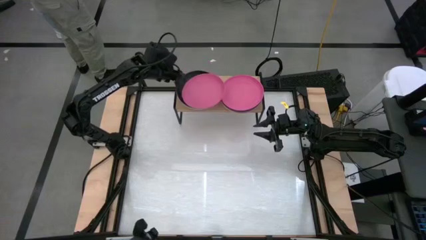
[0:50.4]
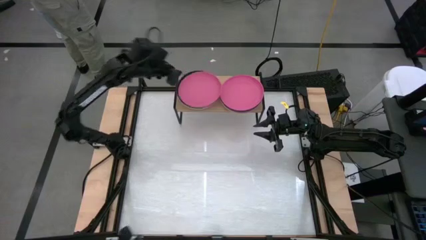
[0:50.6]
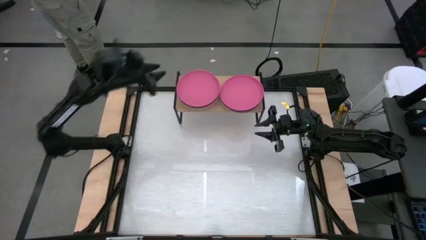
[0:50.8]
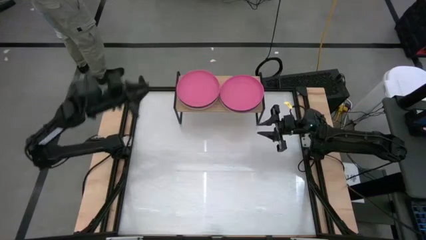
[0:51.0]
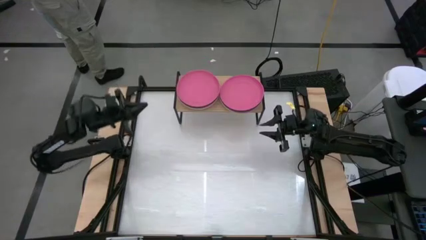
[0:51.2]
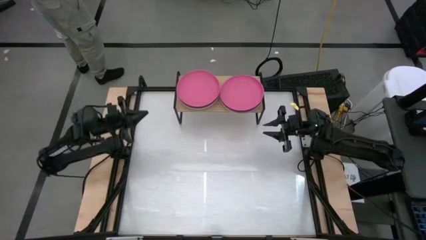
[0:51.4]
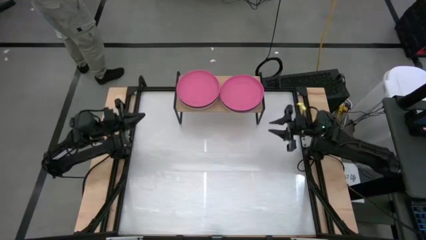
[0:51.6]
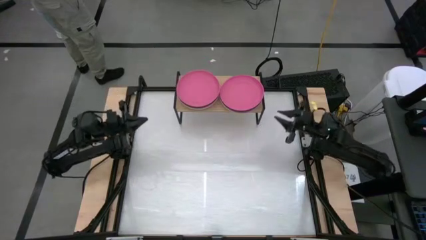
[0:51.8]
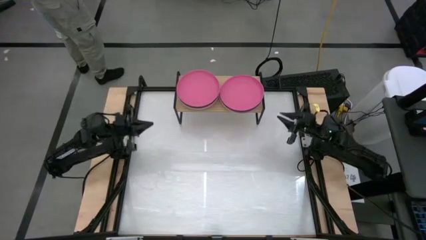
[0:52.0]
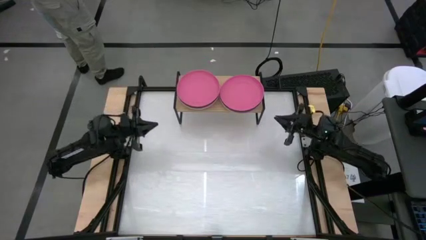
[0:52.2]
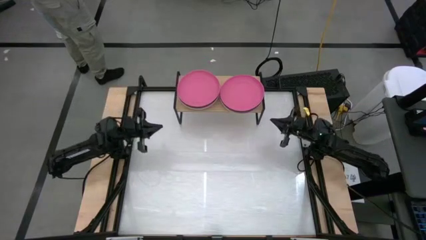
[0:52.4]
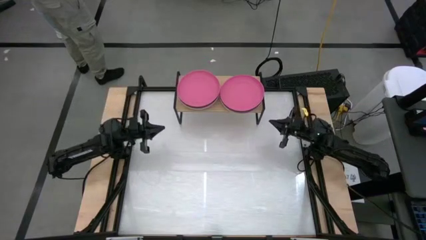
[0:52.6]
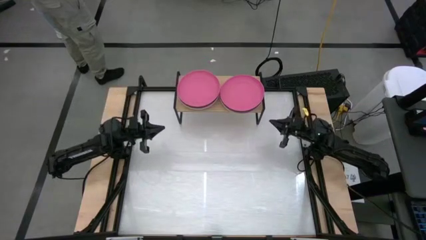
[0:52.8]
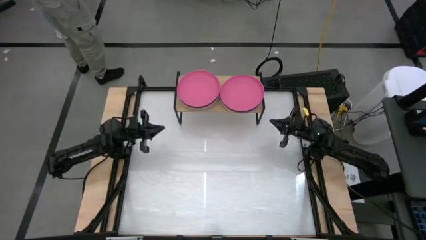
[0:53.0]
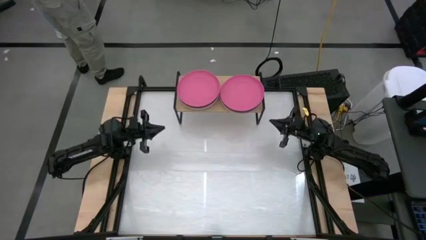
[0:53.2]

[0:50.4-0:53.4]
Task: Place and stack plates onto a shelf
Return to Home Position

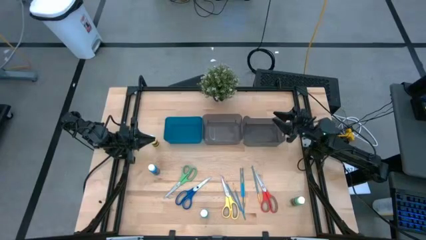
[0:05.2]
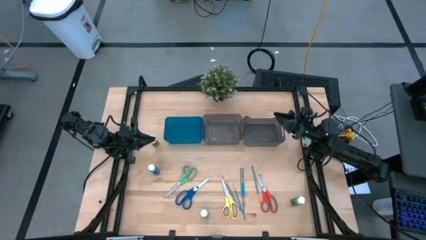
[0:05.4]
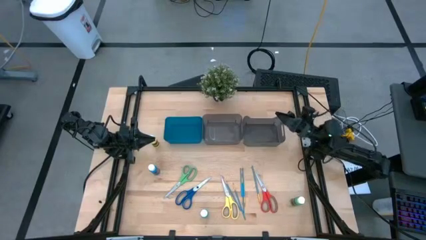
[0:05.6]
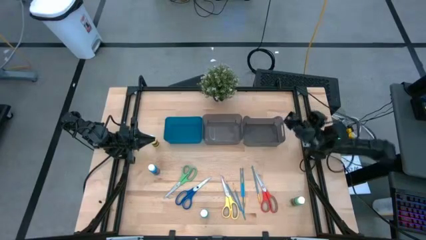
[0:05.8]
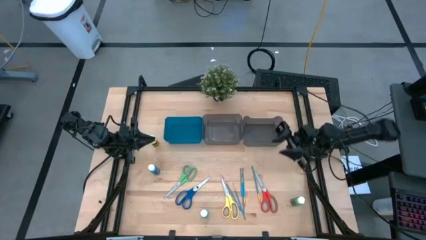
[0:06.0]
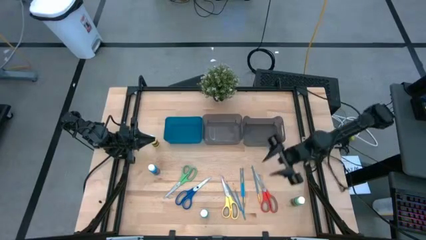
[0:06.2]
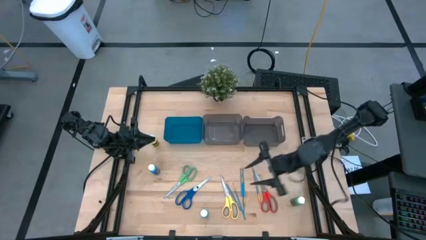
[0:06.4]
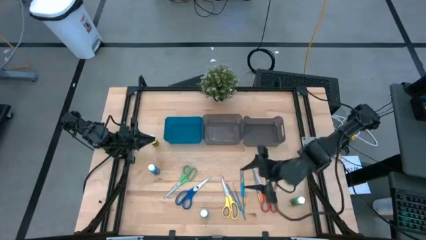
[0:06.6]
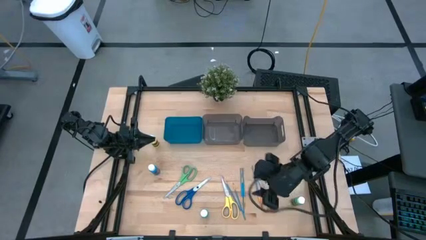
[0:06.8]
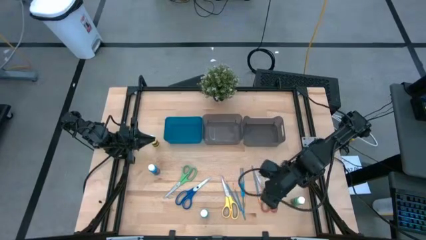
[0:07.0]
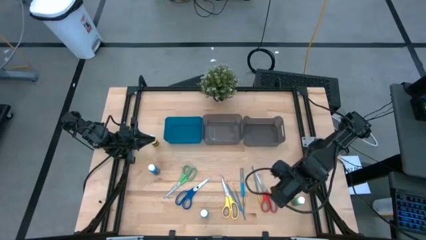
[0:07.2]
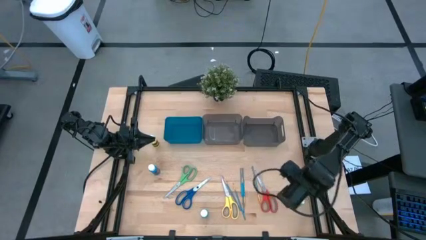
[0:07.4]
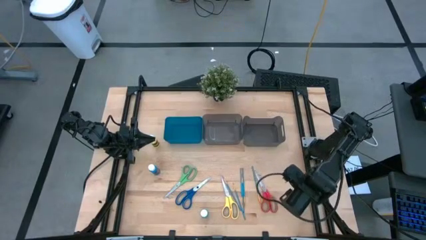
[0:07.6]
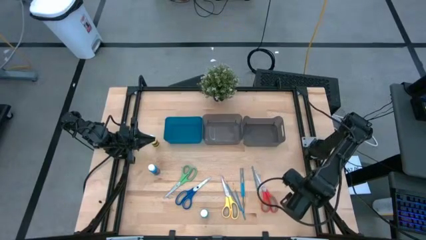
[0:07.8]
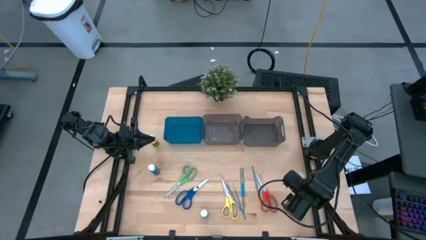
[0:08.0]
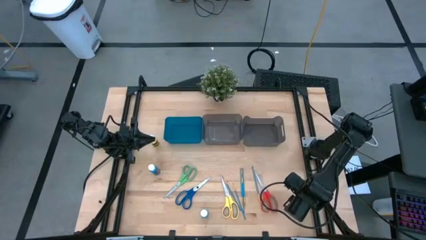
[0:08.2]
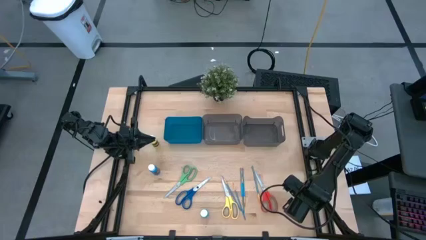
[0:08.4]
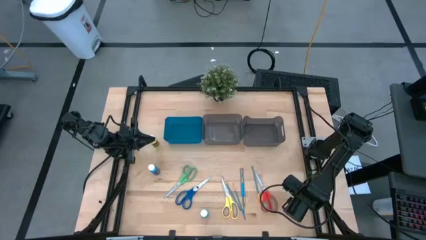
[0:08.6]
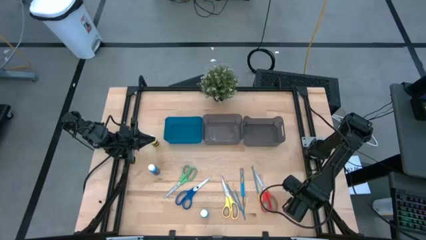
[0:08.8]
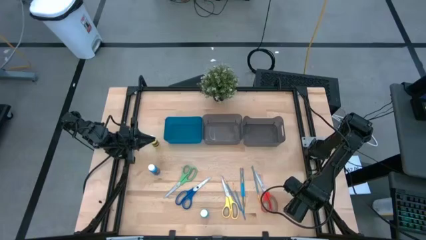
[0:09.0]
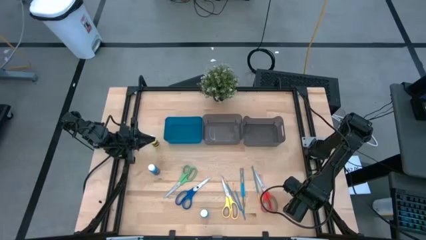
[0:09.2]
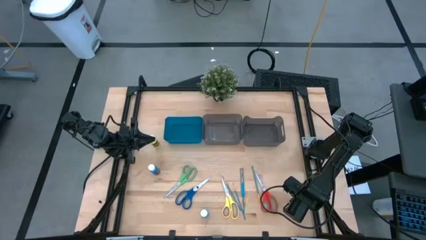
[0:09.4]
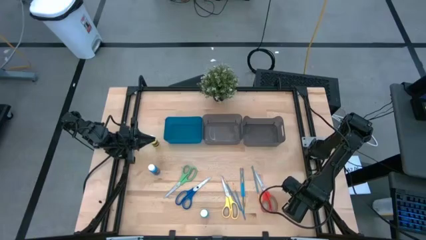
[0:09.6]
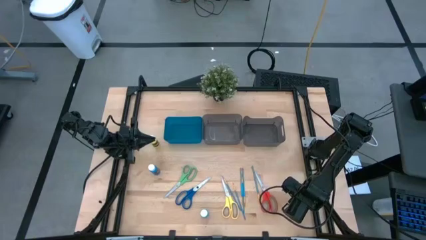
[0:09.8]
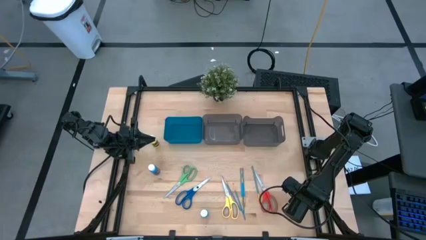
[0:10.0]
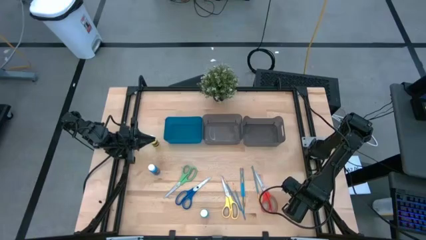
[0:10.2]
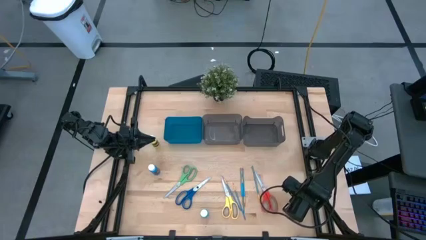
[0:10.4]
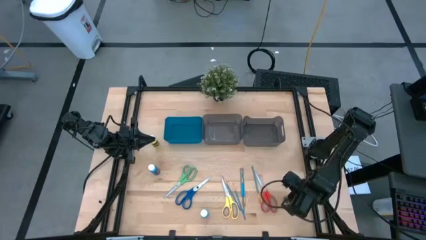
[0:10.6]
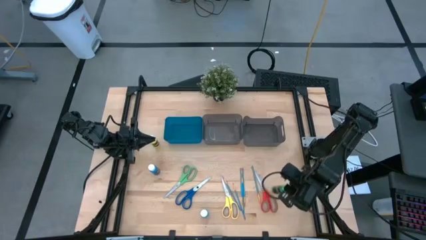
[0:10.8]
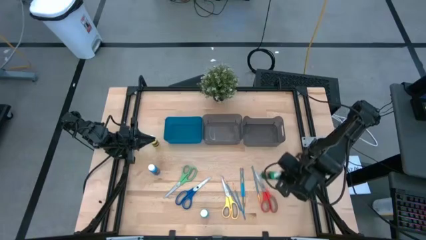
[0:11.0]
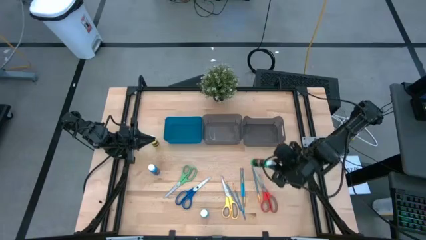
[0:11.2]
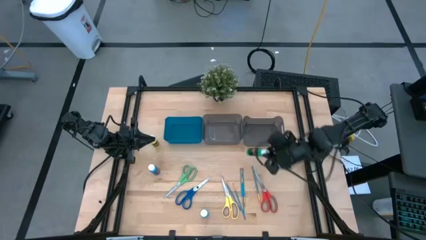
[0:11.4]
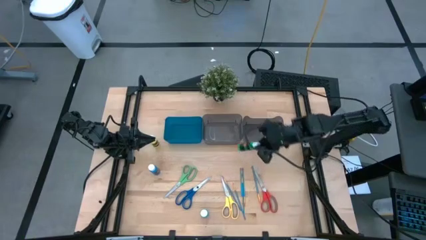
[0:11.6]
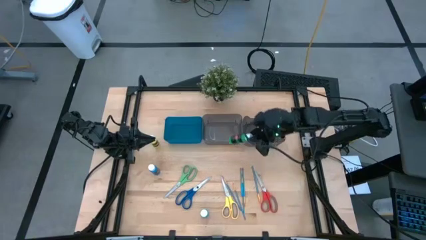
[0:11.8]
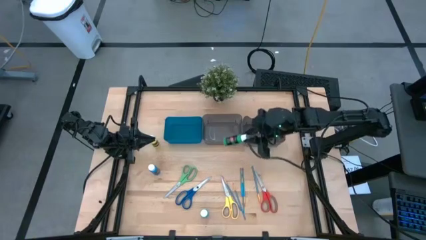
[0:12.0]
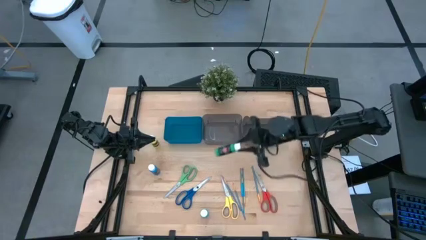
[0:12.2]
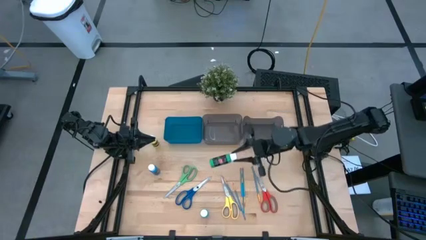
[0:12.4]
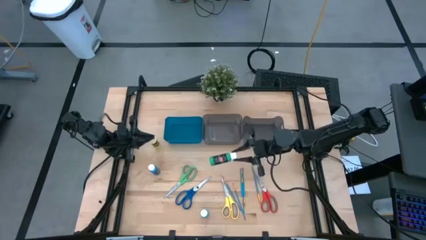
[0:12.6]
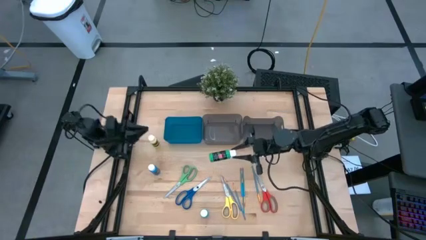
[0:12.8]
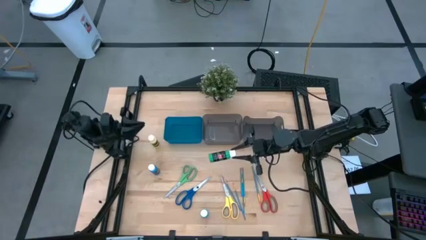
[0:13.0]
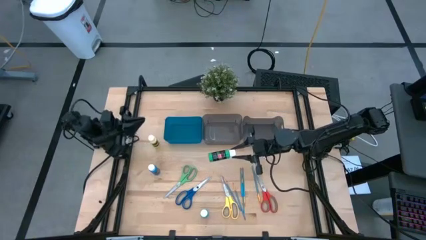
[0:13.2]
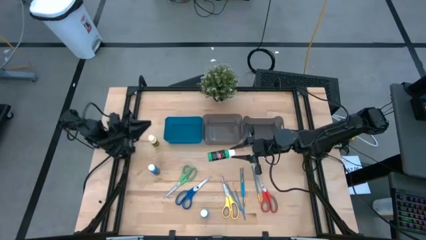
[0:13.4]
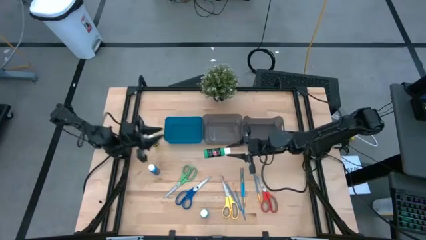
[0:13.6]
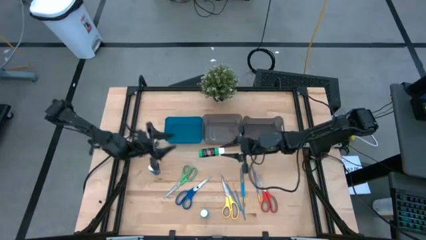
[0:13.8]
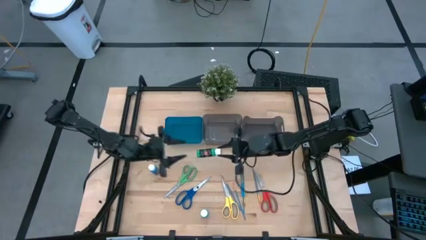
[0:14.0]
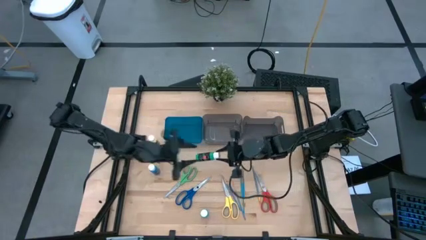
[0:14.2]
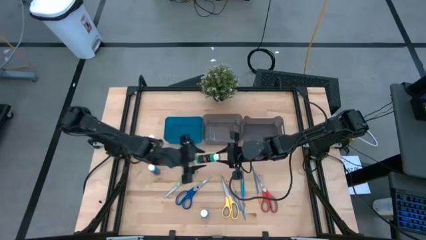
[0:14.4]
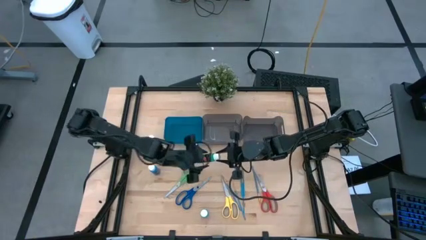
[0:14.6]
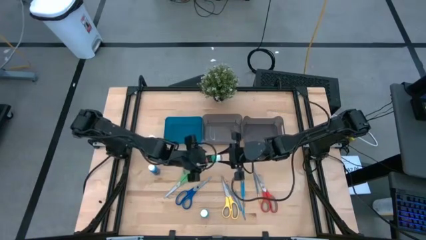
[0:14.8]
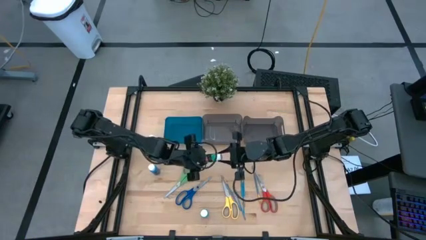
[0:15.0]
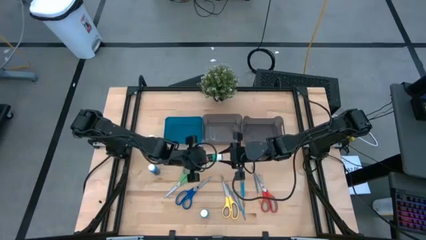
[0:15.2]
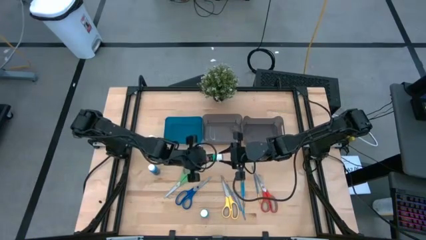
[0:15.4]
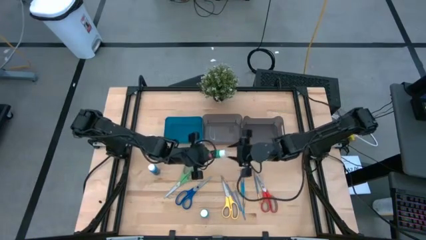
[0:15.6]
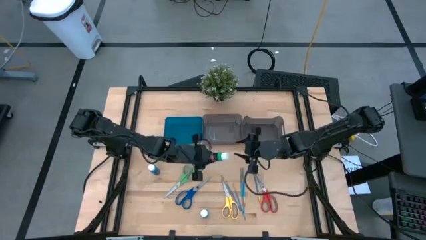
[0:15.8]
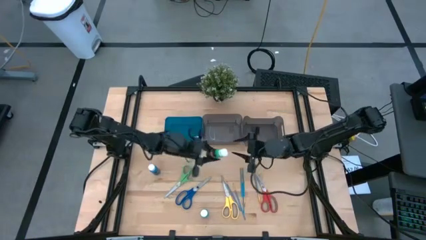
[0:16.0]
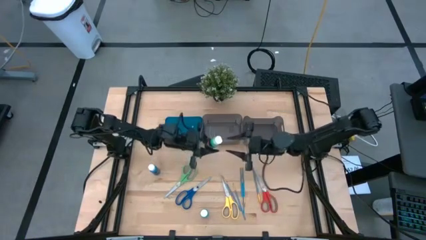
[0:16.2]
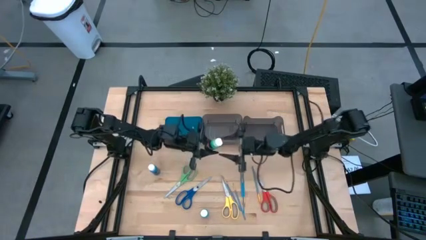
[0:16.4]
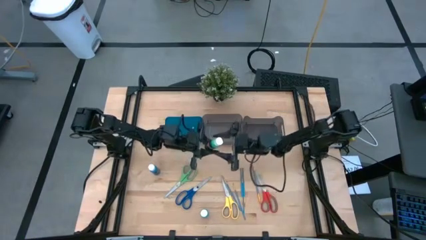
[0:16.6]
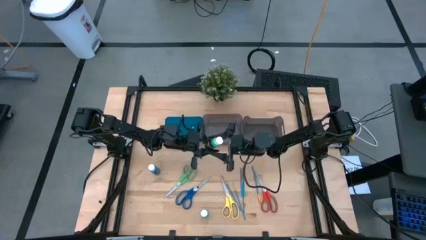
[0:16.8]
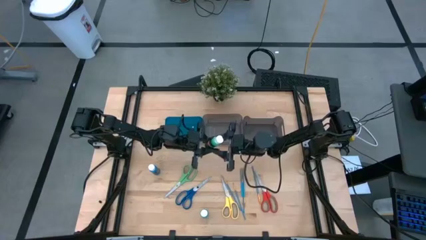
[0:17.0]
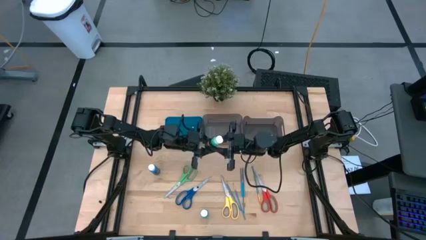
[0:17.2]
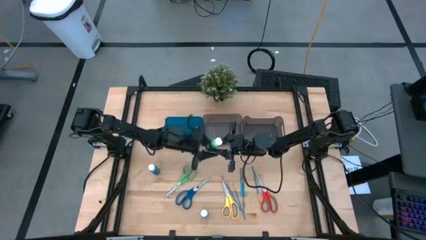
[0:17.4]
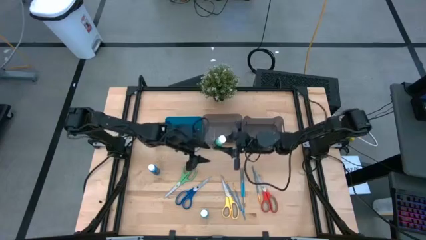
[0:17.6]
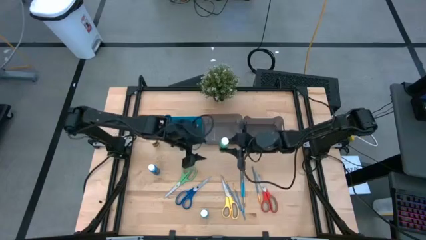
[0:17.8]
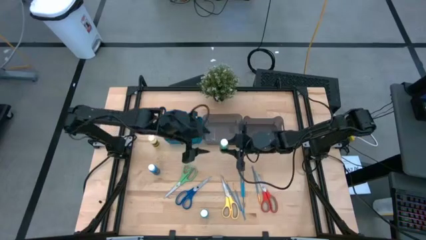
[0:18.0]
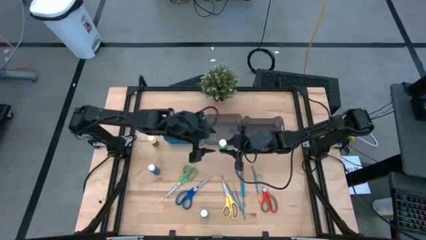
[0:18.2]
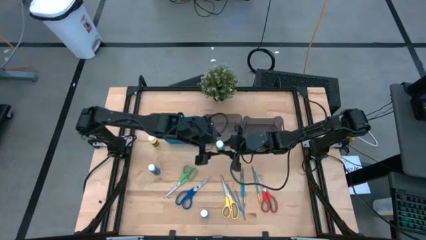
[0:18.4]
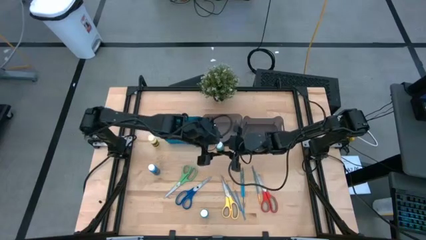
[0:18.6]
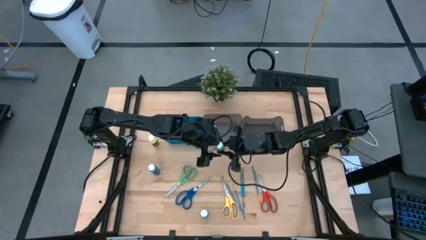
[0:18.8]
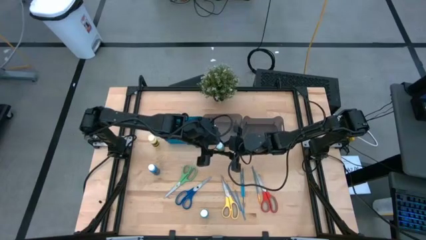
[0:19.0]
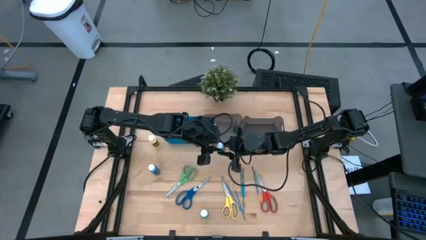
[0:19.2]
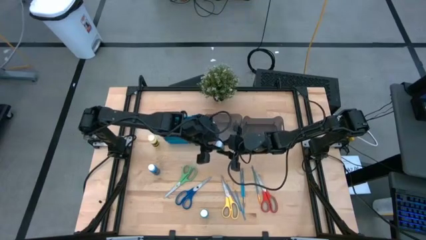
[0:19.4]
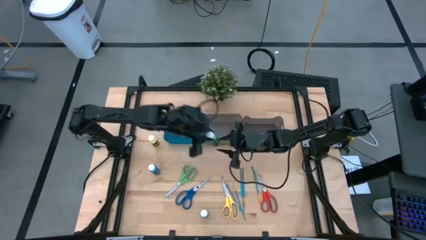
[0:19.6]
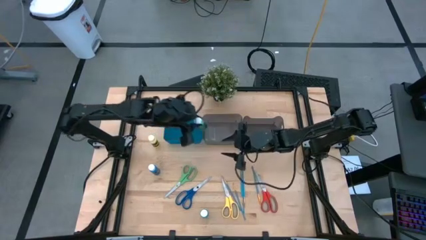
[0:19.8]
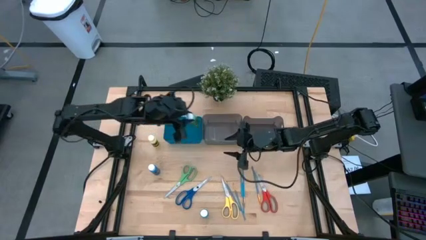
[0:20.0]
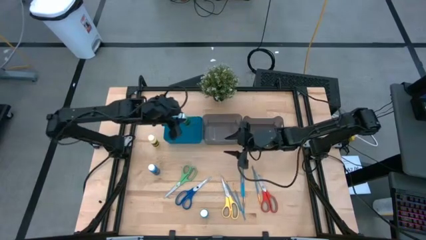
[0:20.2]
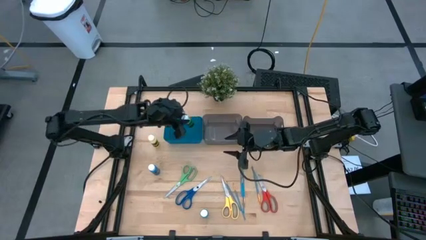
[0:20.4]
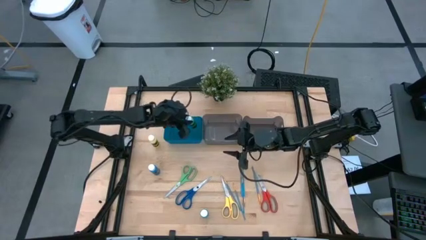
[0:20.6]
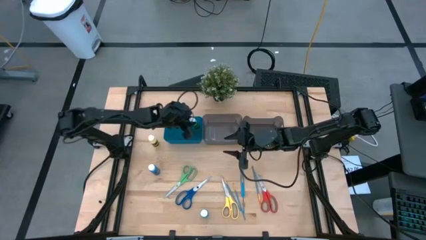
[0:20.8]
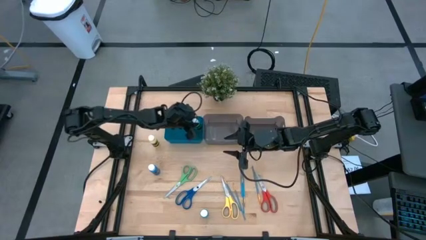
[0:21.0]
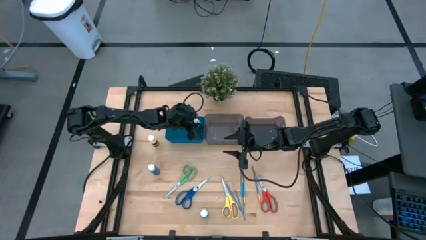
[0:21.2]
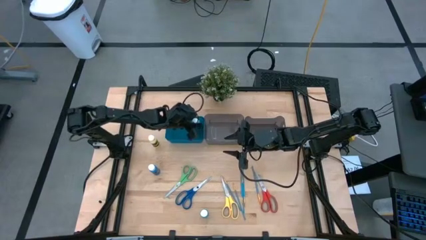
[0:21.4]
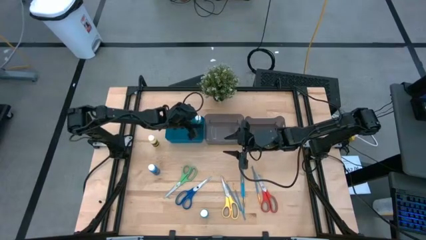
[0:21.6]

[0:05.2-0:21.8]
Task: Pick & Place Paint Supplies
Put the green paint bottle into the blue bin
